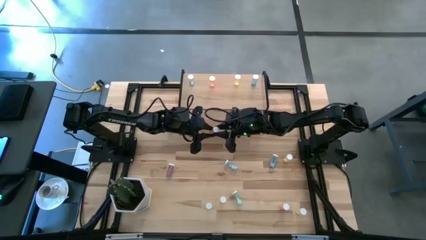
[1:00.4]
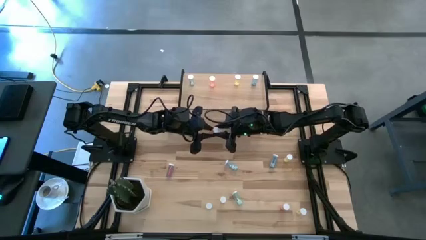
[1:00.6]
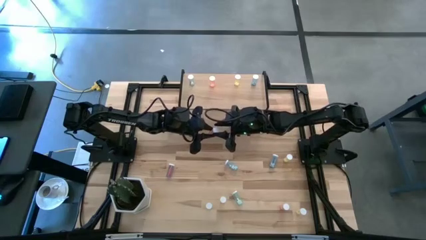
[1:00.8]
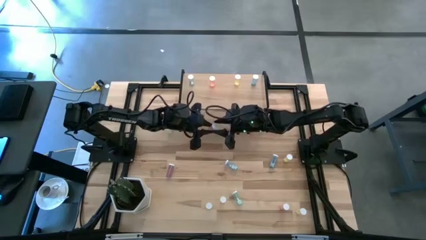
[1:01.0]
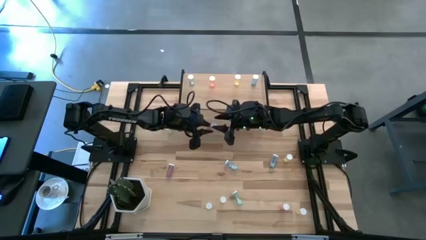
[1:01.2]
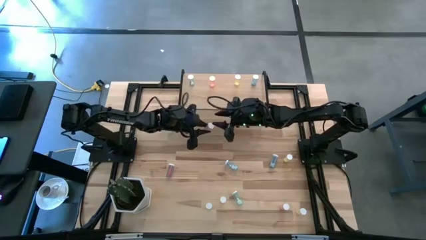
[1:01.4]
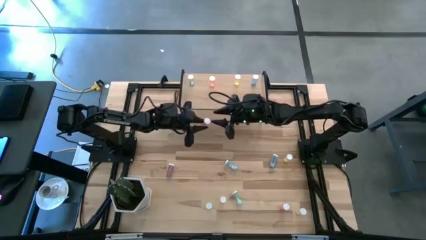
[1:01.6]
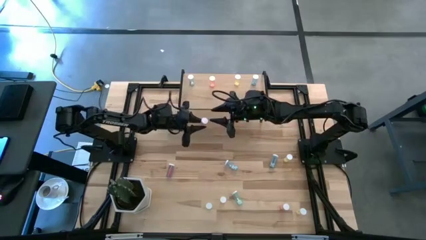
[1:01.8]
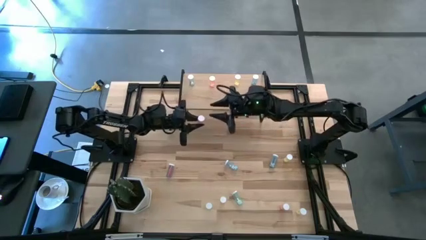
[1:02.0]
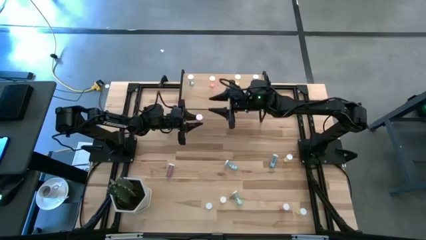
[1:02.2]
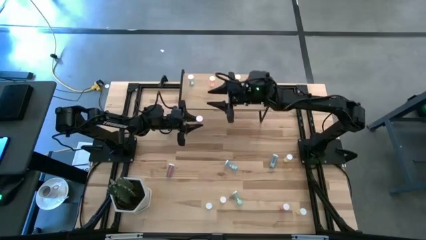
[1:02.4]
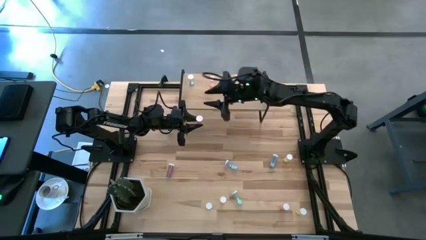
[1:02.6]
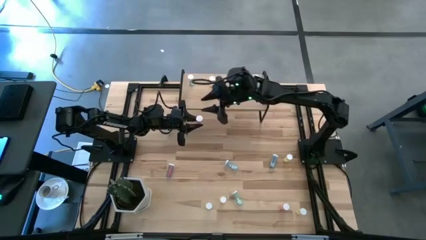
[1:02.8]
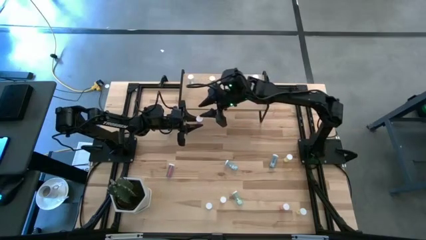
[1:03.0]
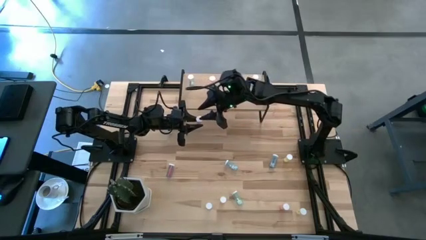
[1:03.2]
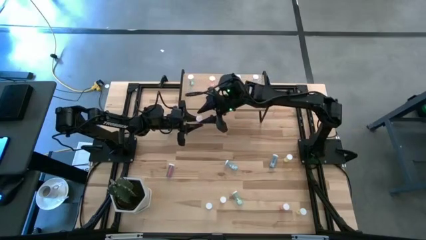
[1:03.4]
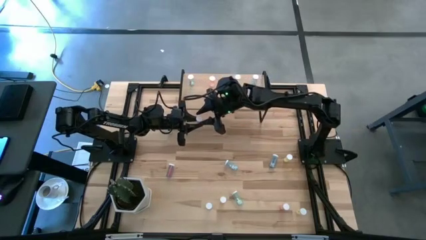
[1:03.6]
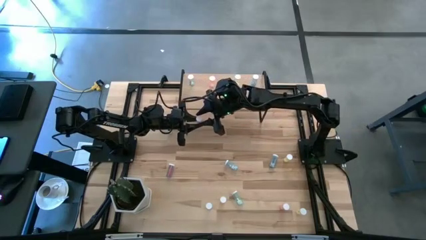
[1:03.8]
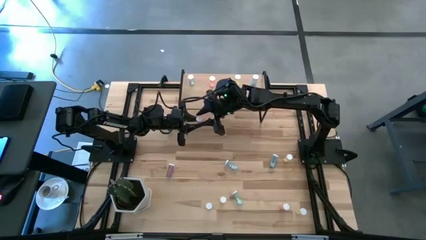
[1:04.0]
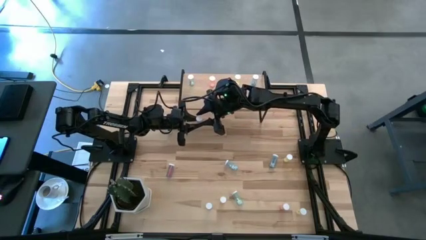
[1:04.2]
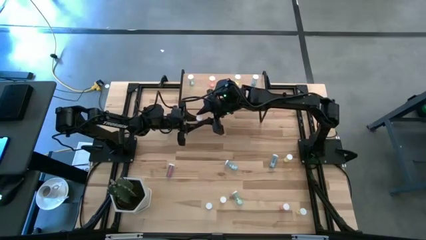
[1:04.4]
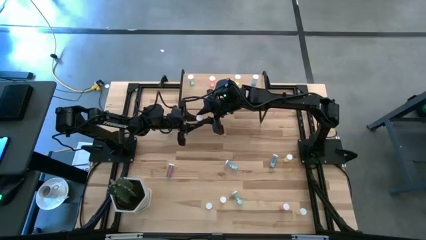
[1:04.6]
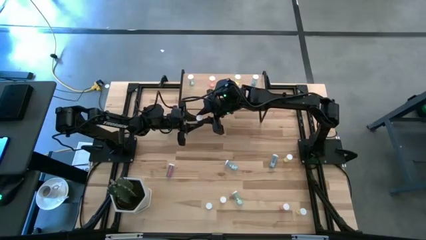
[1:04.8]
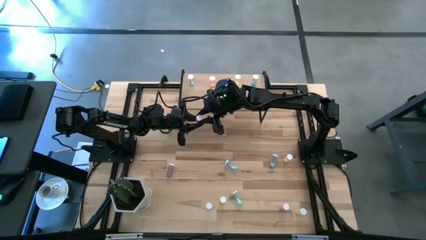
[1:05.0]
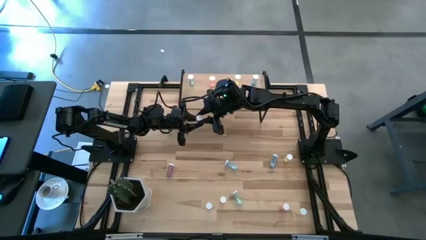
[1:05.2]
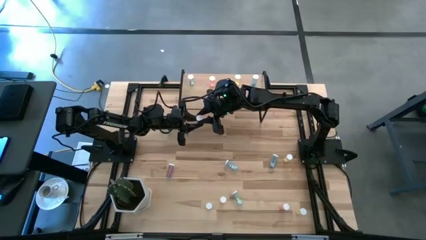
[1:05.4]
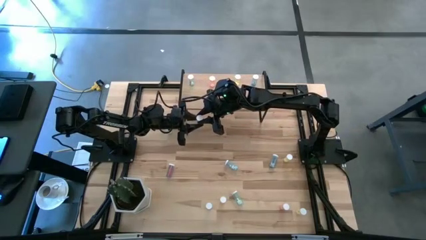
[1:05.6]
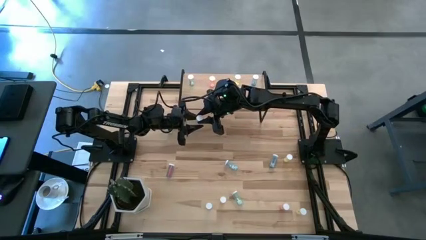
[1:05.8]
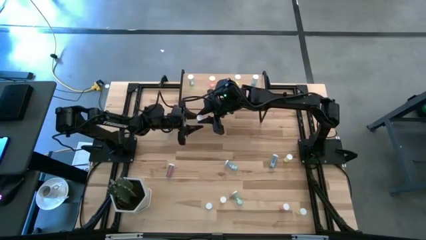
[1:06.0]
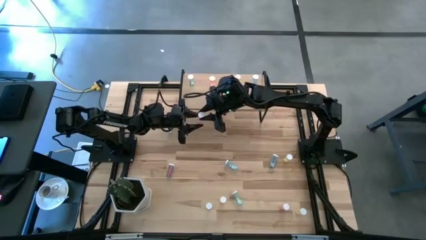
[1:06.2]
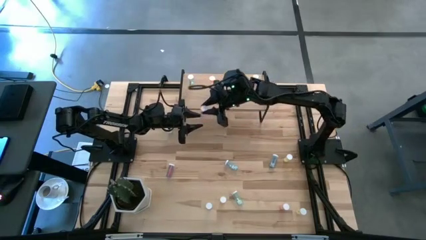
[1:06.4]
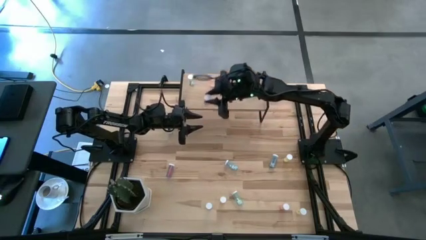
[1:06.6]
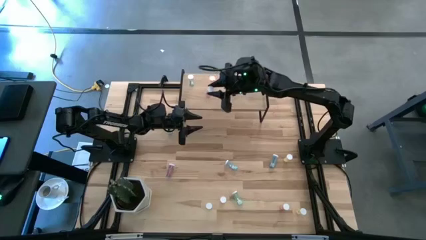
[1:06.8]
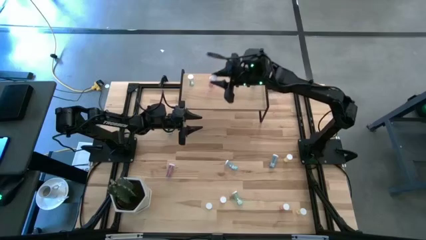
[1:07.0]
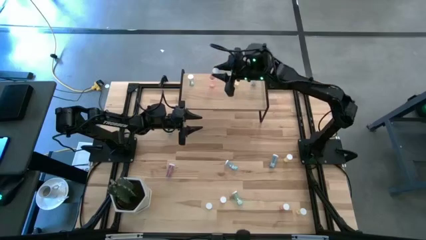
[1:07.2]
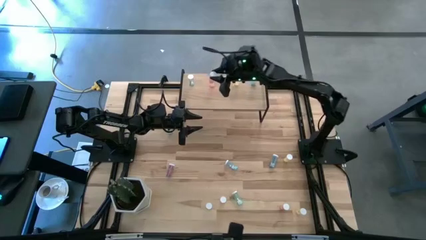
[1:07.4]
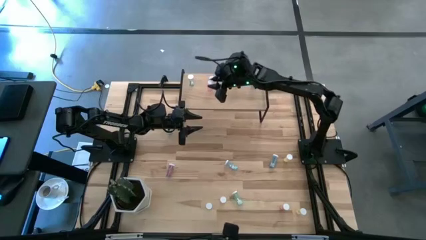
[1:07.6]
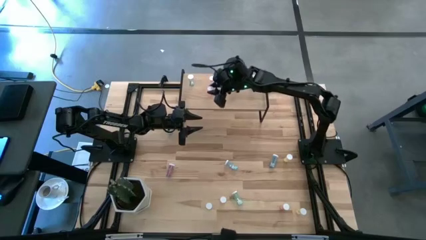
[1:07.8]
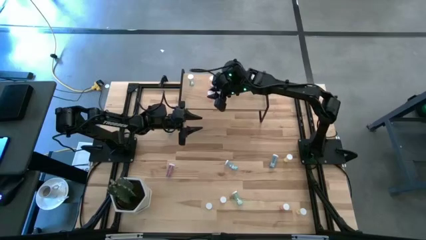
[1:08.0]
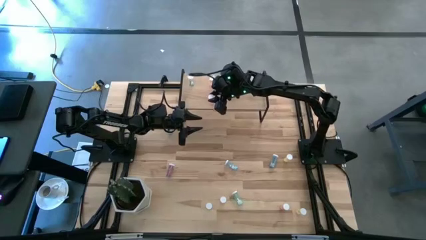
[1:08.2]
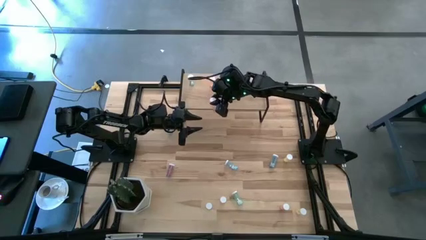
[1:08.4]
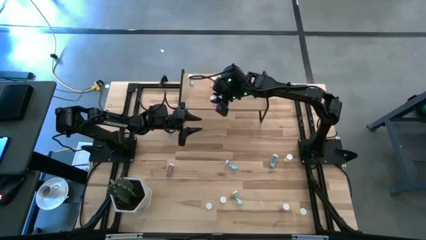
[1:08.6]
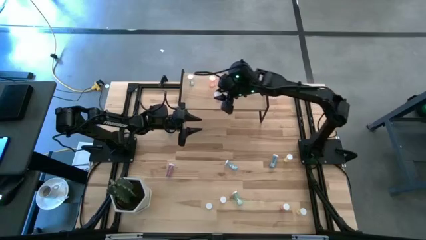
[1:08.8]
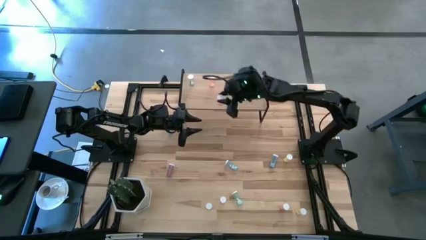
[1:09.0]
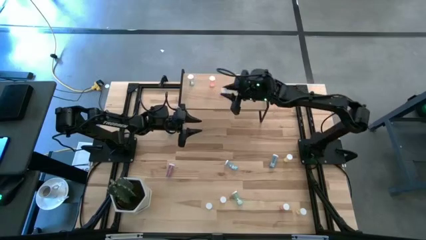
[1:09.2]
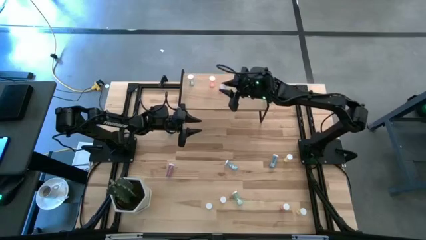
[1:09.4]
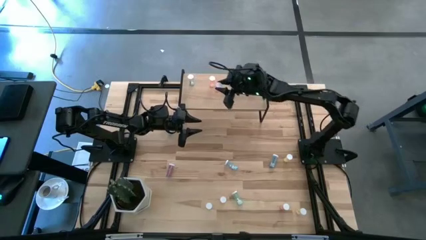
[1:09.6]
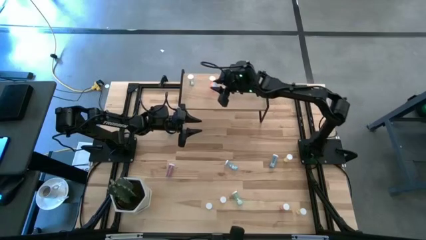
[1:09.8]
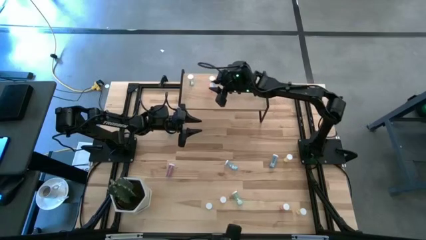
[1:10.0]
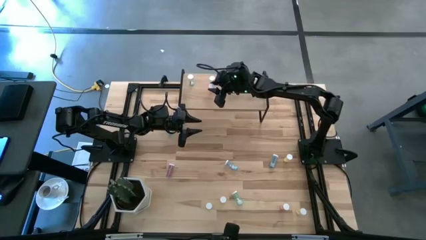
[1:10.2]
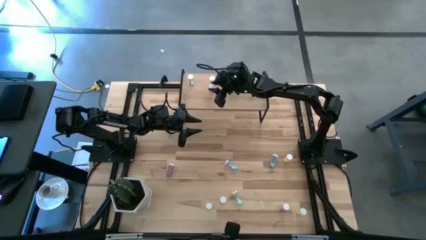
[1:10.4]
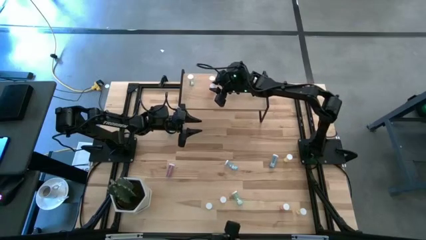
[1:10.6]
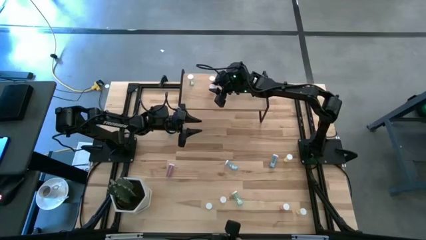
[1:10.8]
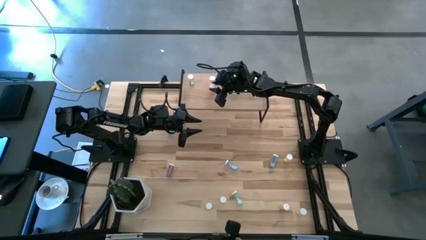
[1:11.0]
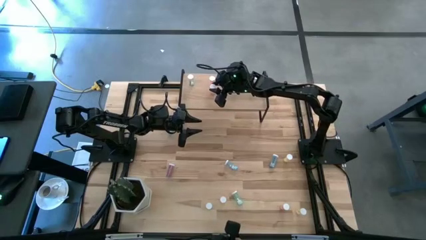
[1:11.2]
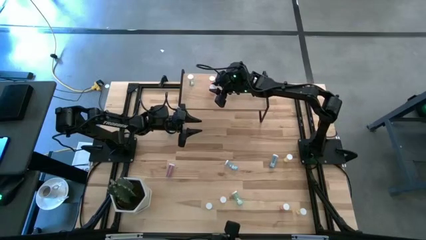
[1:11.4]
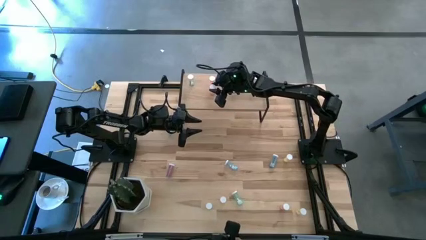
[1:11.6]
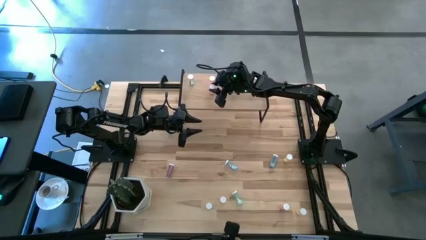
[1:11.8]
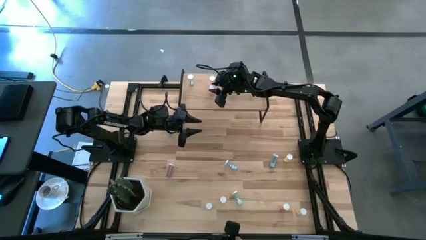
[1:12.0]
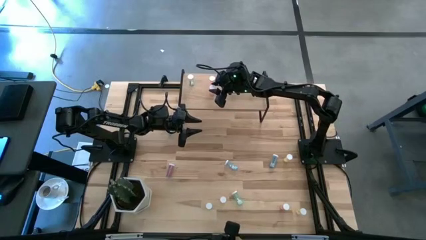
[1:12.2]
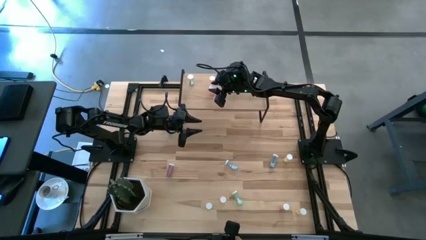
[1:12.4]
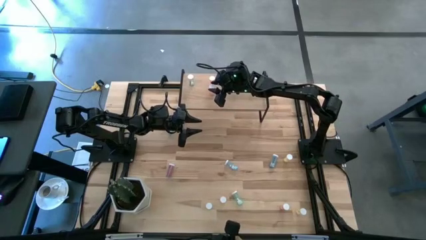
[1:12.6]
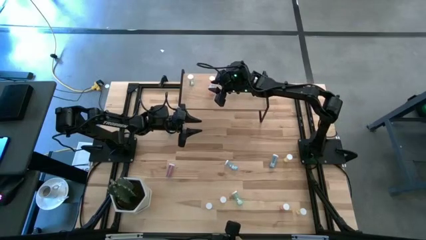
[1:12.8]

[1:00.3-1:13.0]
Task: Pick and place medicine bottles onto shelf by color
Align the pink pill bottle with the pink bottle on the shelf
